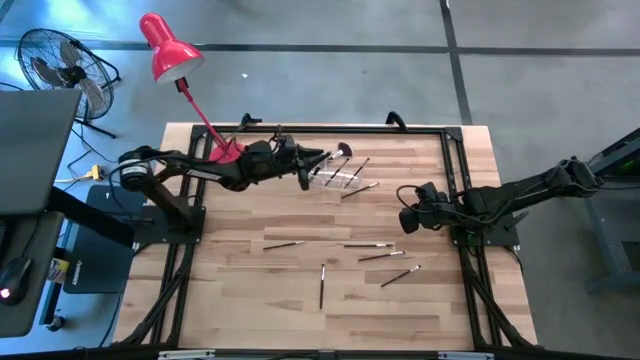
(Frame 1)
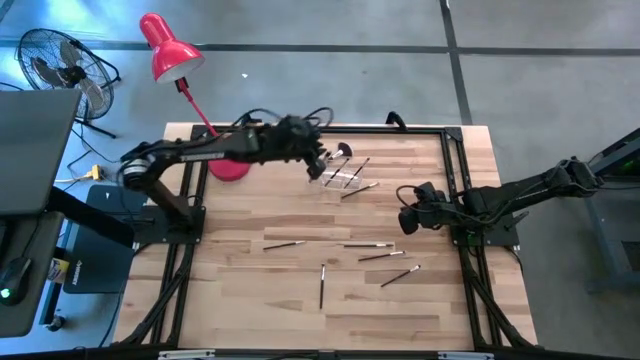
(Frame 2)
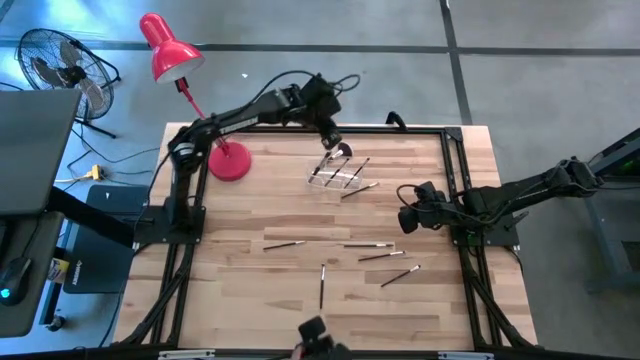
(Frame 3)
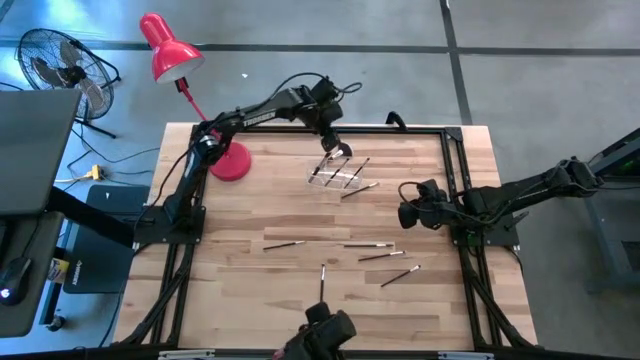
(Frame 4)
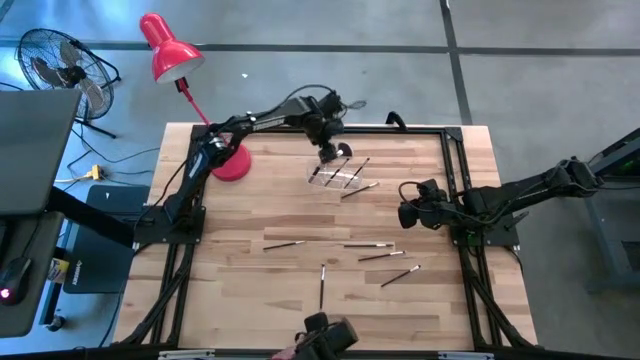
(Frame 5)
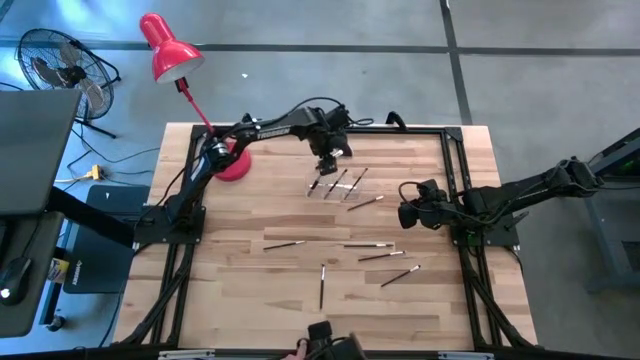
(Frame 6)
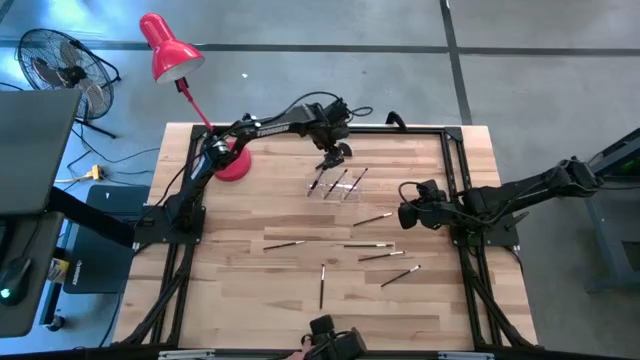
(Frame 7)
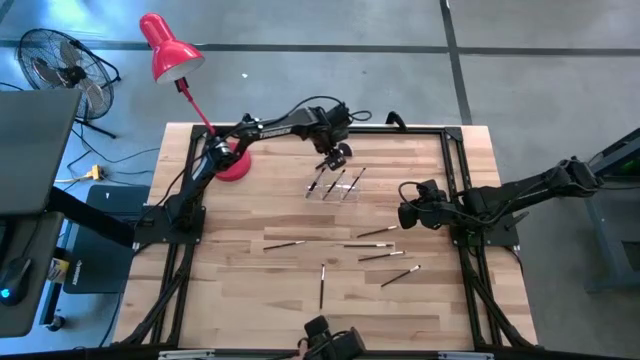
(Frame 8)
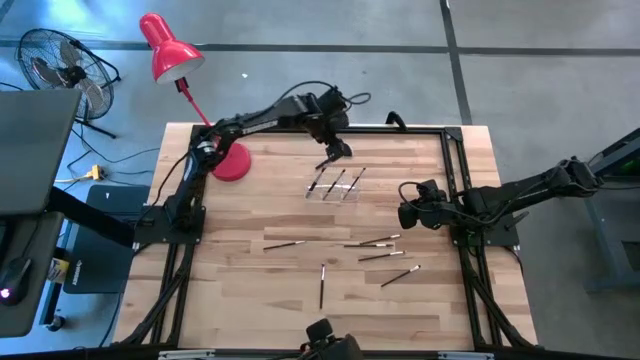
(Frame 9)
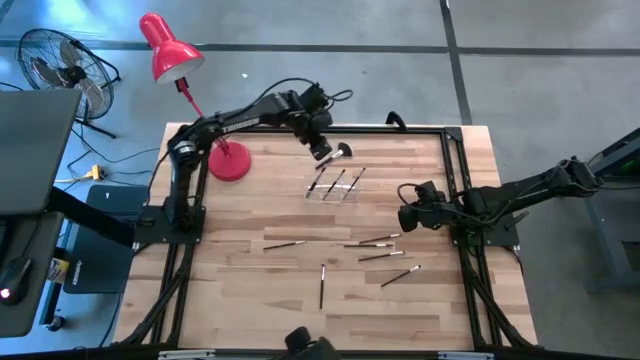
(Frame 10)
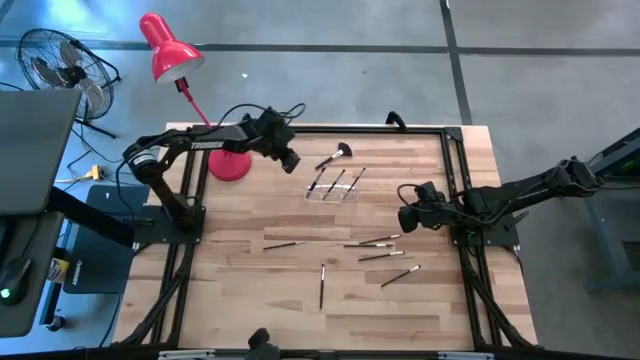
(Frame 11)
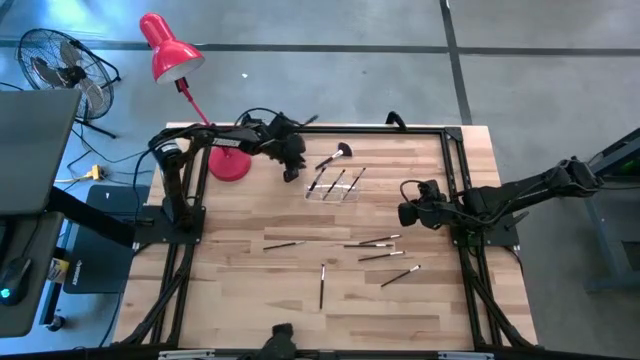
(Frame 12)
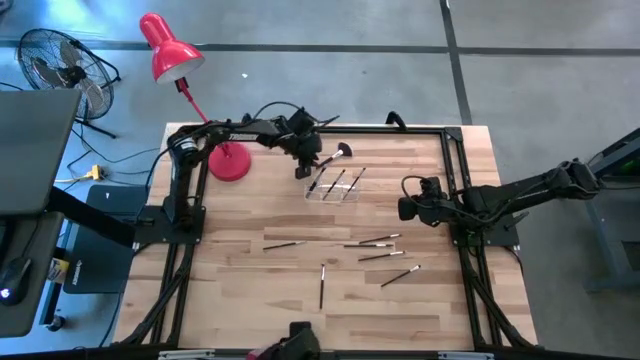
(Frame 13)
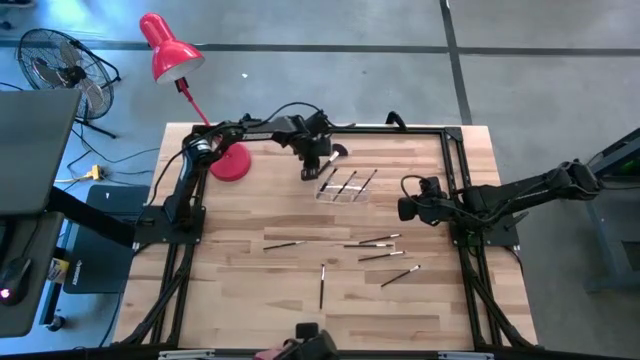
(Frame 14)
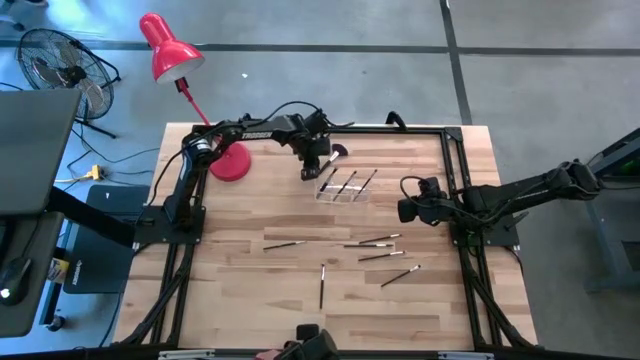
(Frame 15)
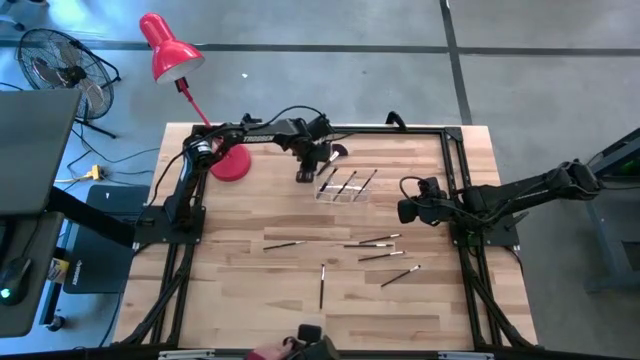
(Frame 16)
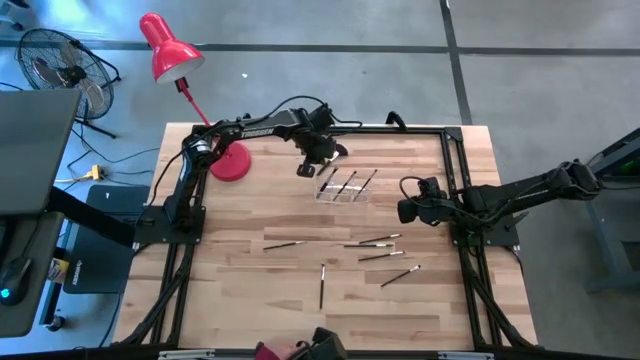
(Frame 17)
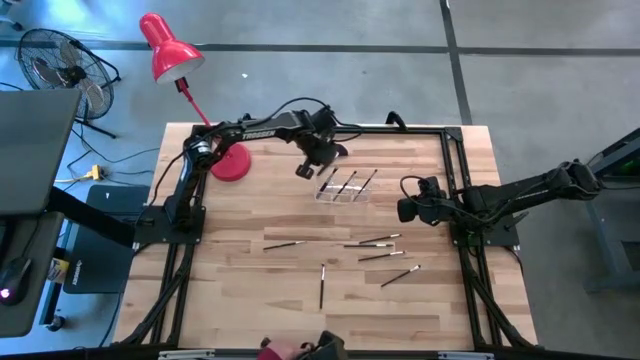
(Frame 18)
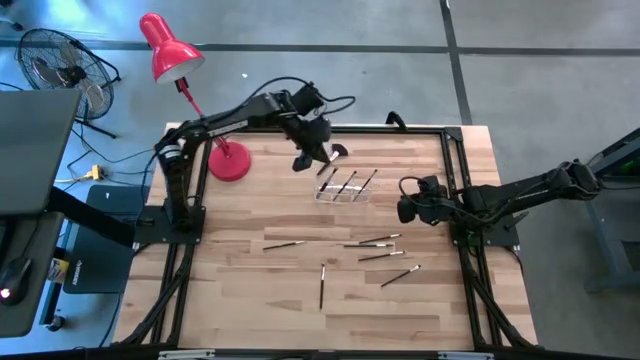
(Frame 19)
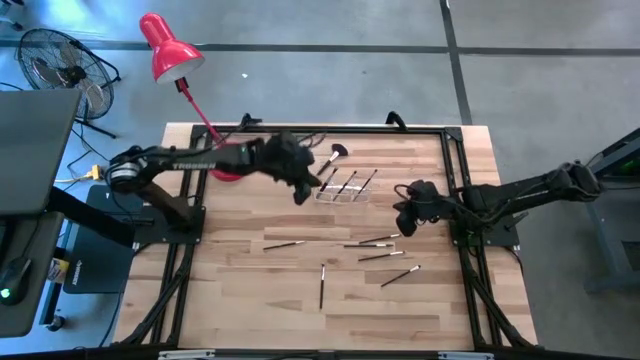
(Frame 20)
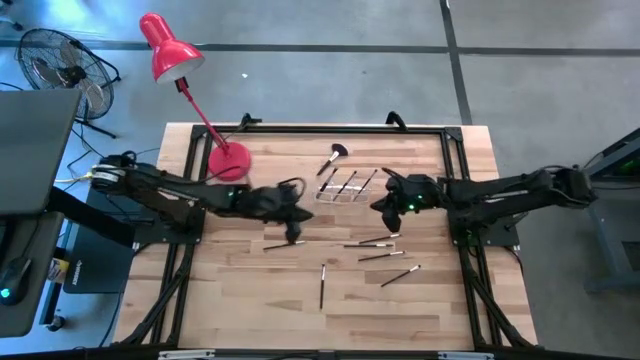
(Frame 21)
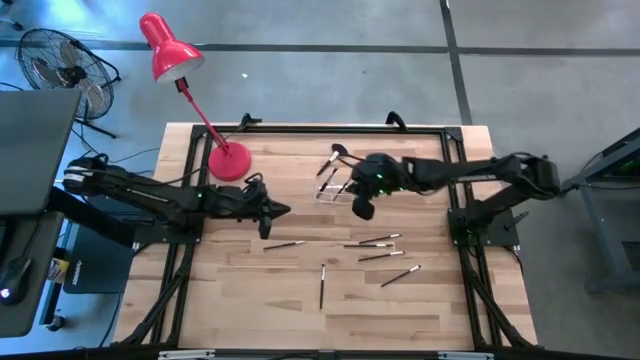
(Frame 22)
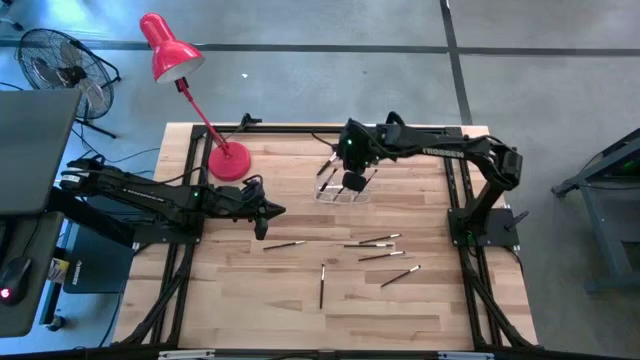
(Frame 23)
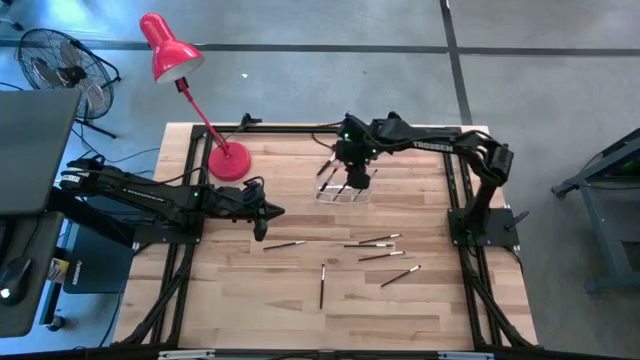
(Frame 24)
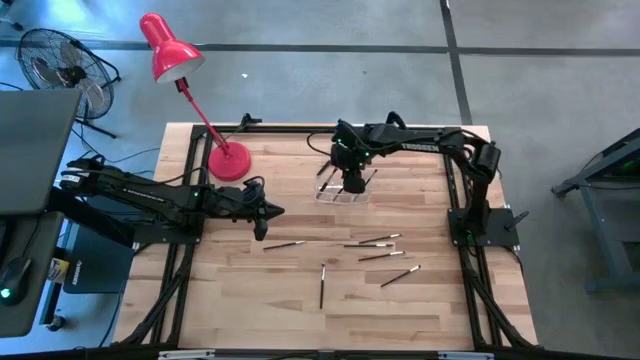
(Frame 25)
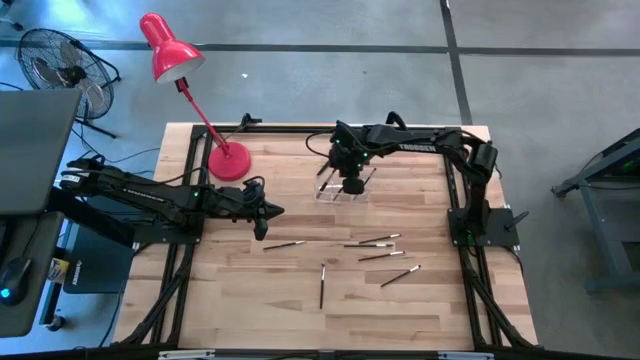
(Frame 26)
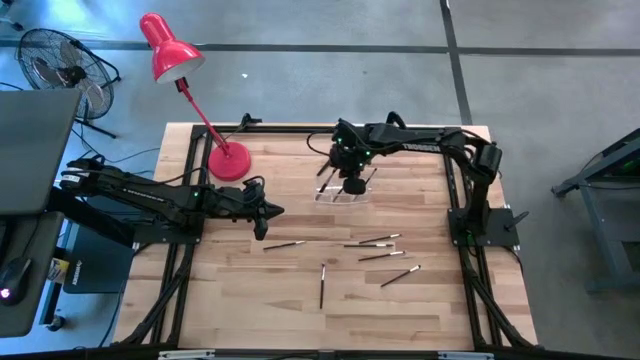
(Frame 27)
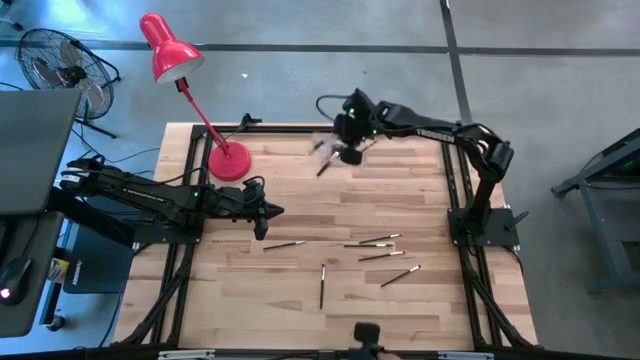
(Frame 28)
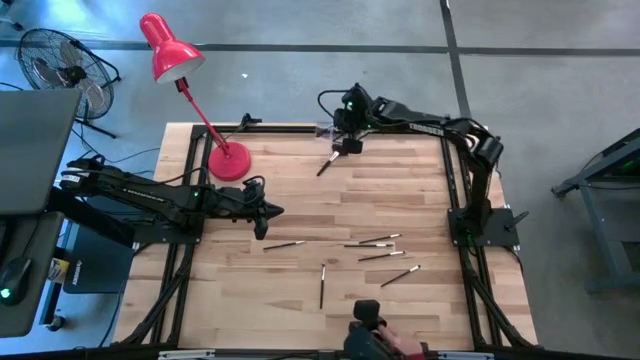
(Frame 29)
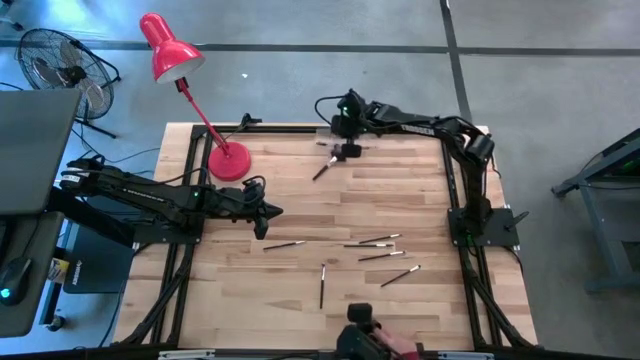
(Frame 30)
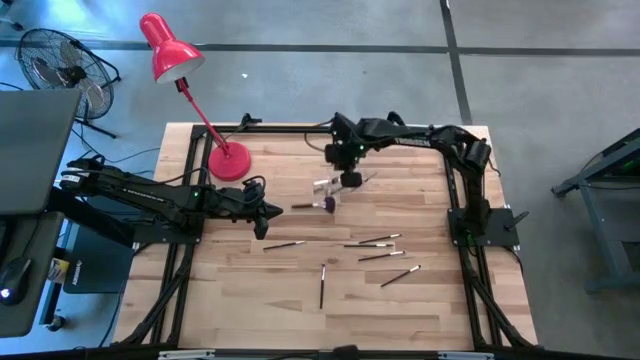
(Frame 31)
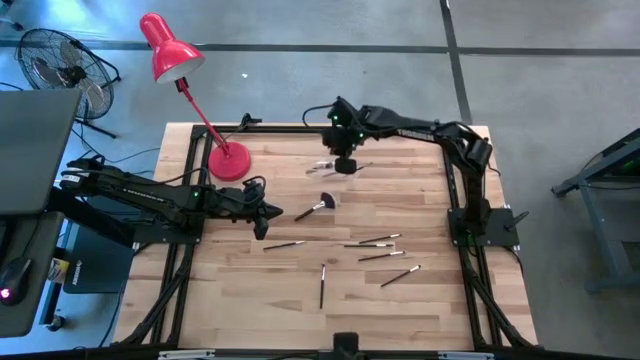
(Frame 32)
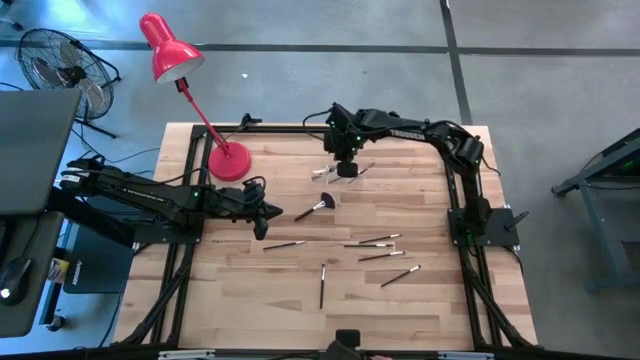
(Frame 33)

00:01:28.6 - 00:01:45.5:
Task: Put items in baskets/containers
Adjust the transparent organizer

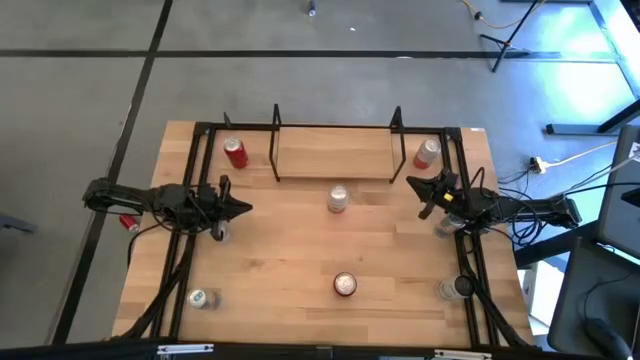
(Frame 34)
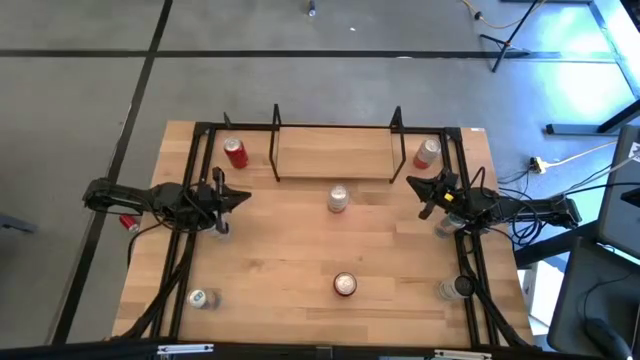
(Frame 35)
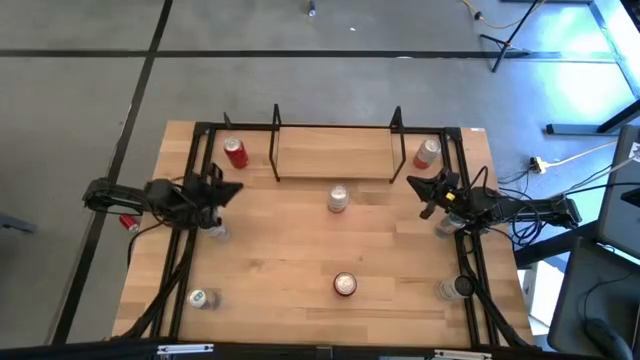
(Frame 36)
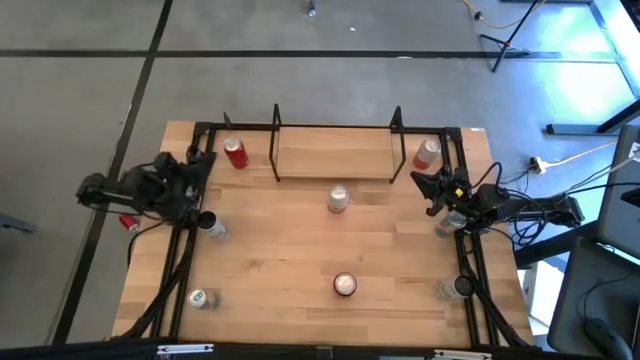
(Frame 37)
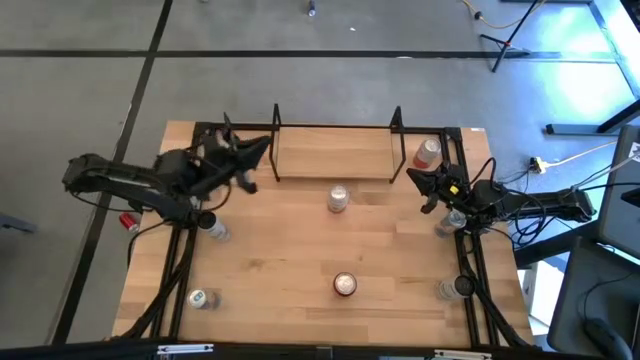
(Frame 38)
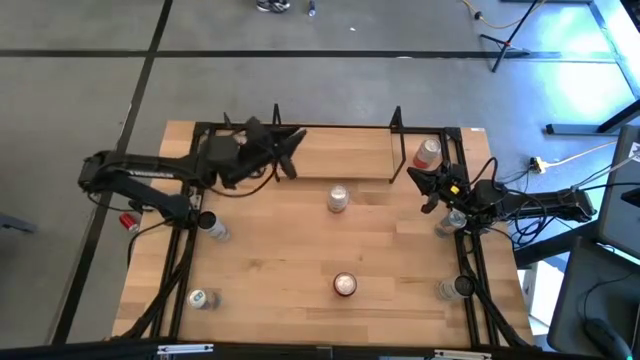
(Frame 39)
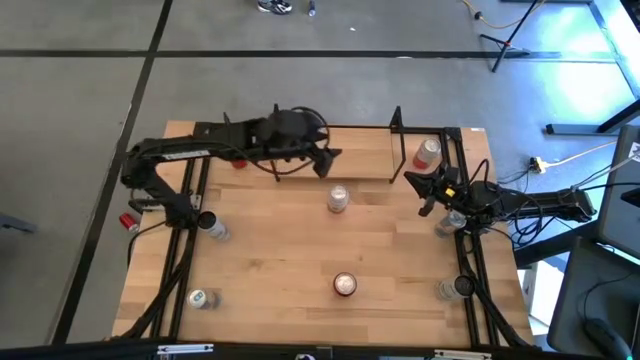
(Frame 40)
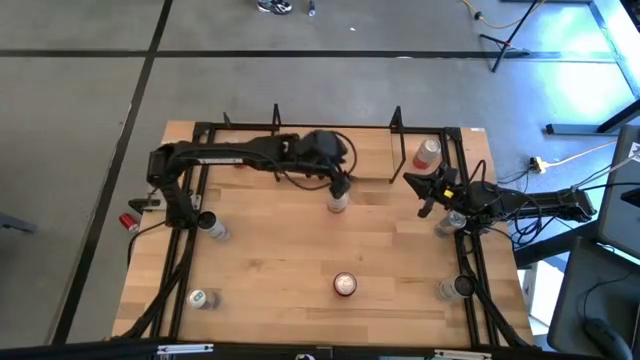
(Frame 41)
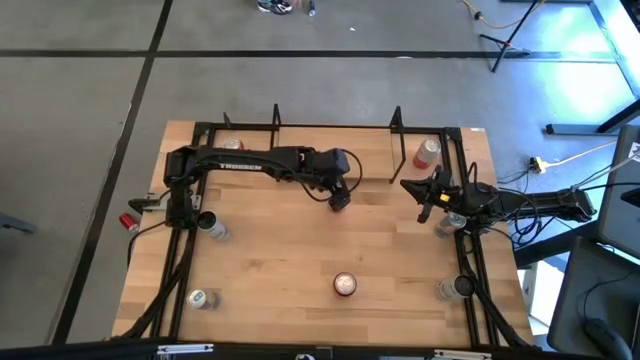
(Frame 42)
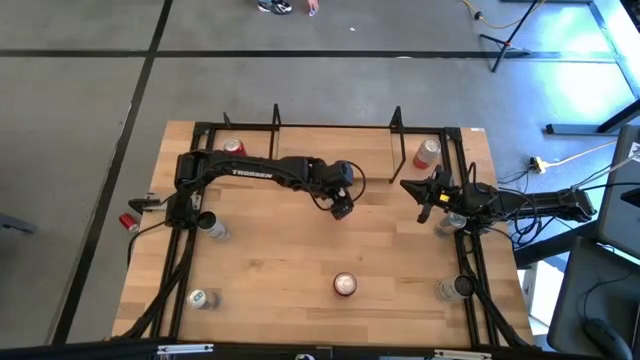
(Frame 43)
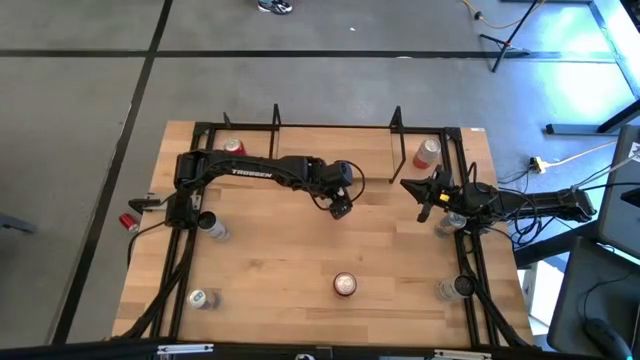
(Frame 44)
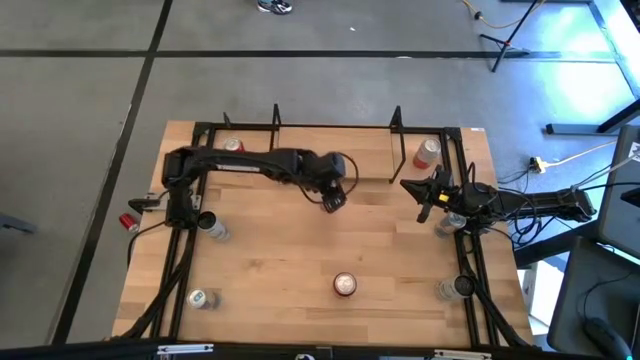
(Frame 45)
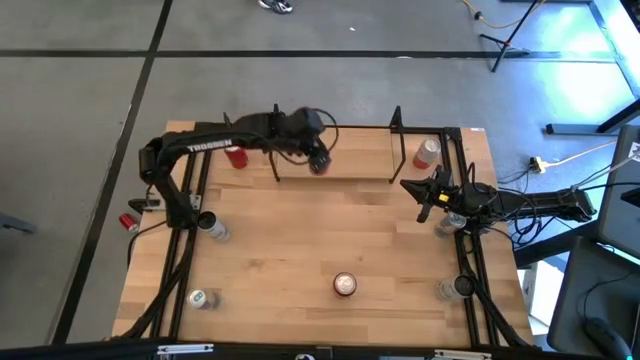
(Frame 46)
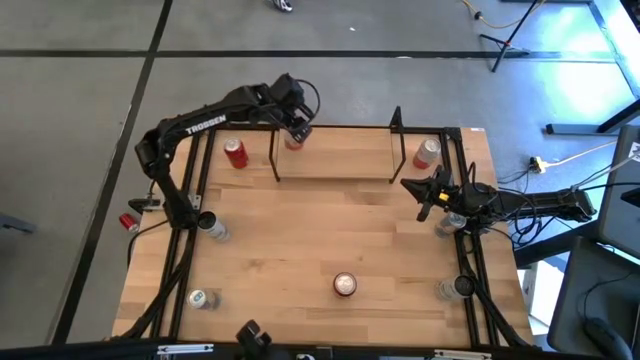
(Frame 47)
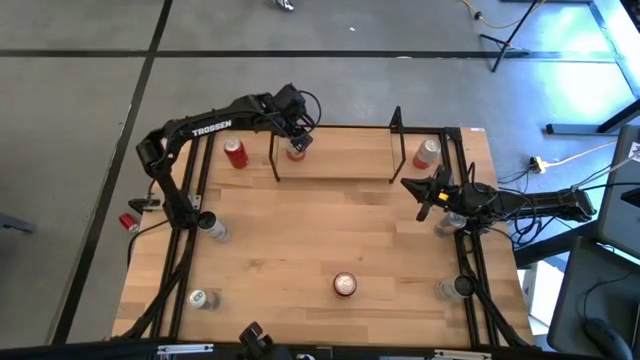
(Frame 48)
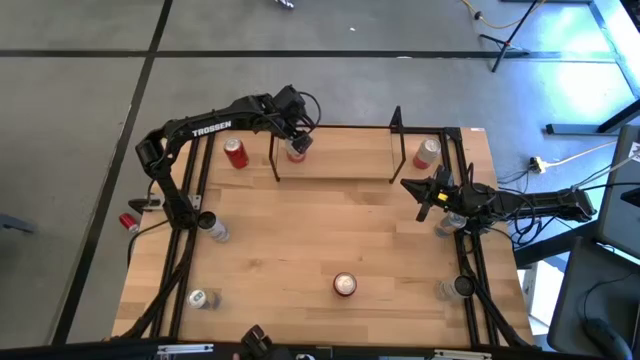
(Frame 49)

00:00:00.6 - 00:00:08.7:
Task: Place canned beverage on shelf
Put the bottom pink soda can on the shelf
